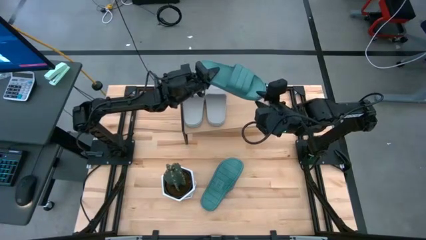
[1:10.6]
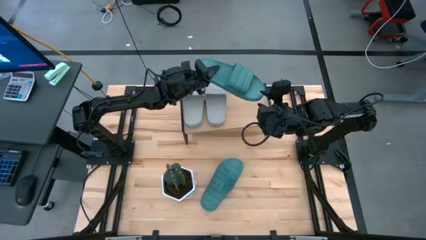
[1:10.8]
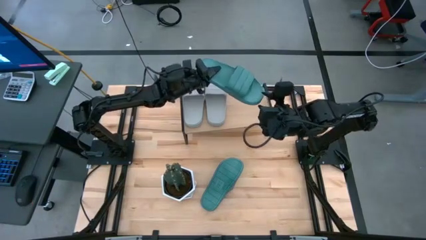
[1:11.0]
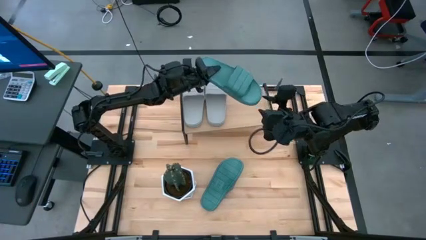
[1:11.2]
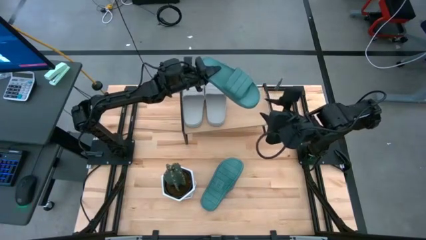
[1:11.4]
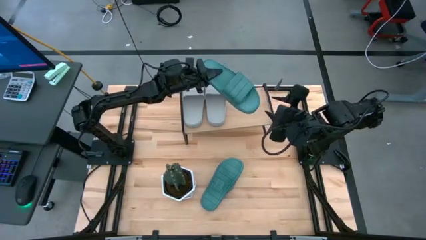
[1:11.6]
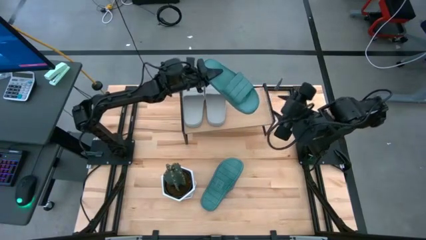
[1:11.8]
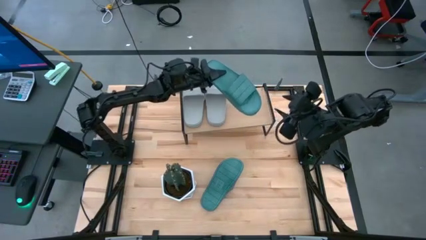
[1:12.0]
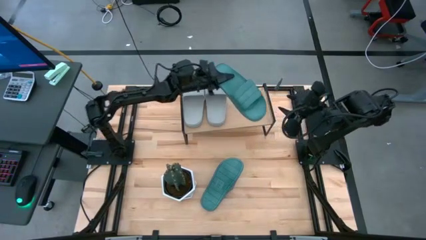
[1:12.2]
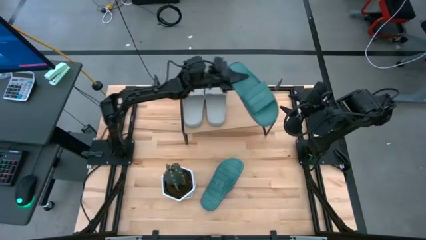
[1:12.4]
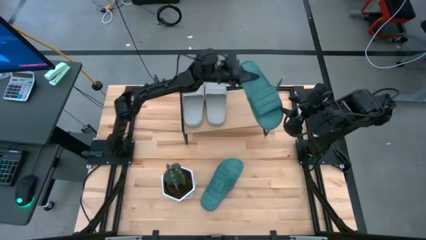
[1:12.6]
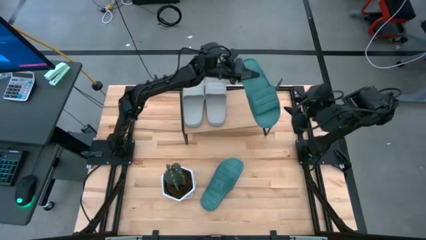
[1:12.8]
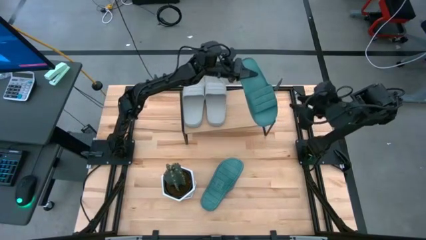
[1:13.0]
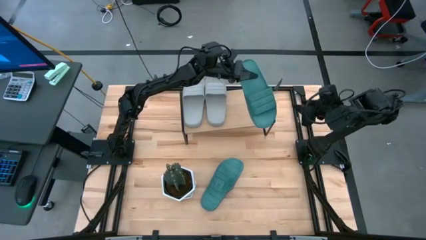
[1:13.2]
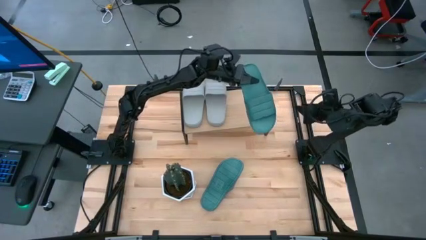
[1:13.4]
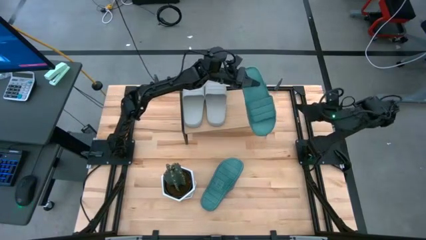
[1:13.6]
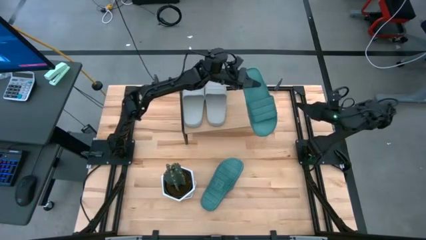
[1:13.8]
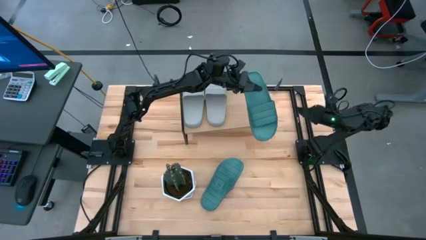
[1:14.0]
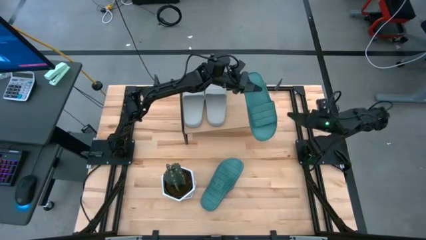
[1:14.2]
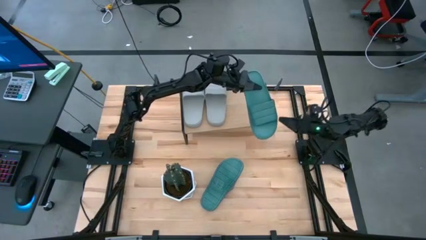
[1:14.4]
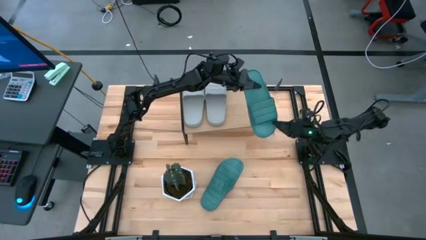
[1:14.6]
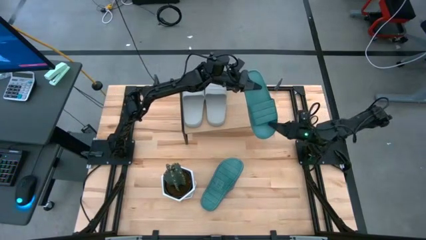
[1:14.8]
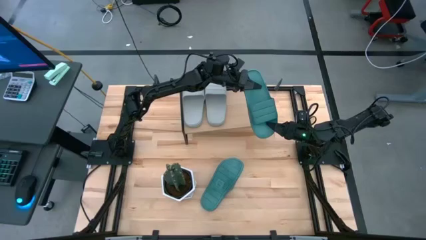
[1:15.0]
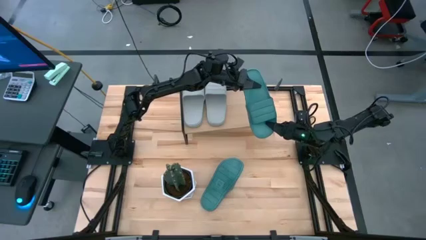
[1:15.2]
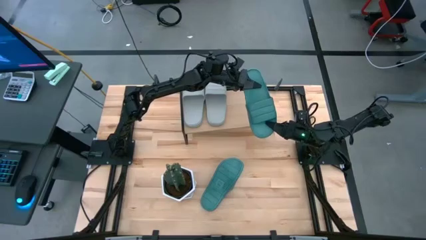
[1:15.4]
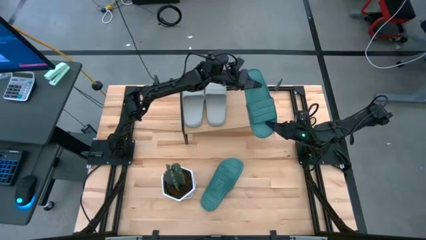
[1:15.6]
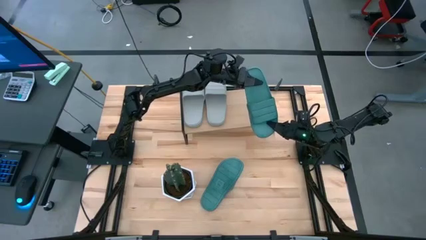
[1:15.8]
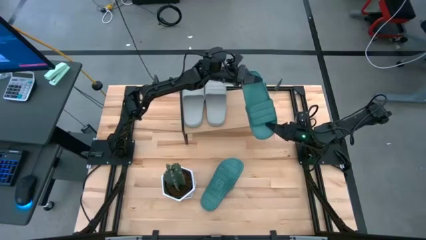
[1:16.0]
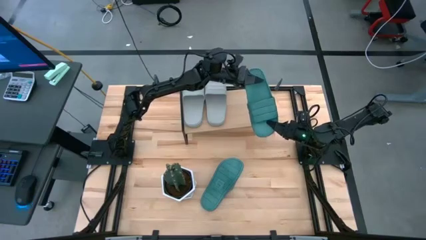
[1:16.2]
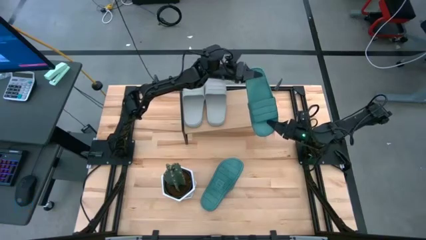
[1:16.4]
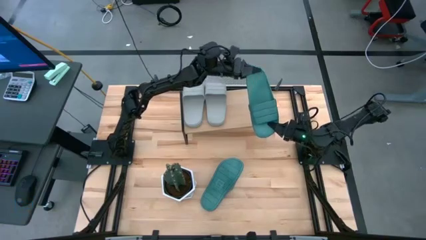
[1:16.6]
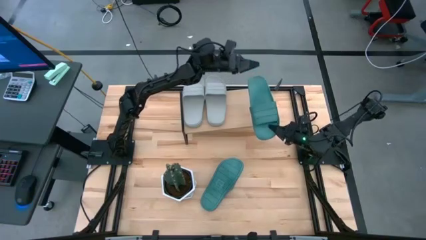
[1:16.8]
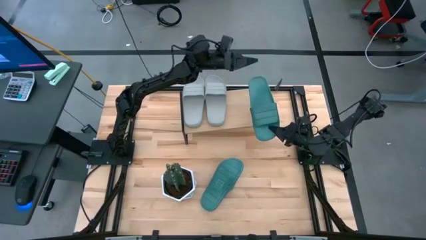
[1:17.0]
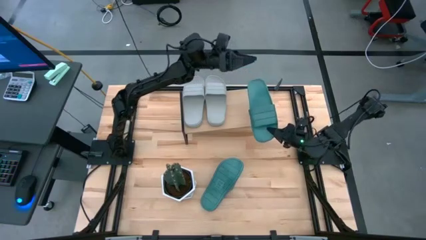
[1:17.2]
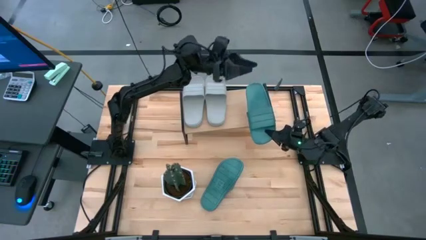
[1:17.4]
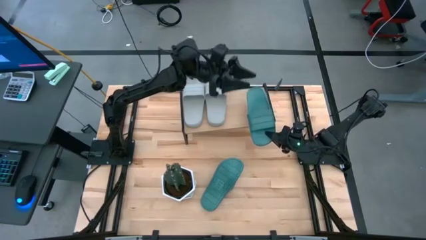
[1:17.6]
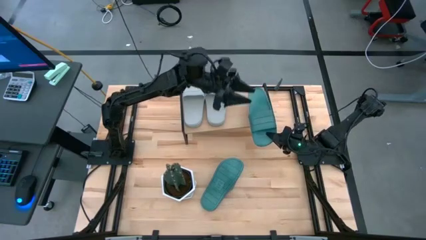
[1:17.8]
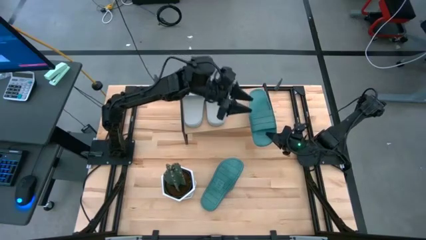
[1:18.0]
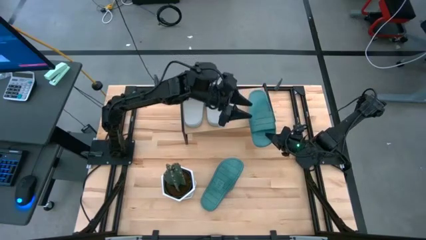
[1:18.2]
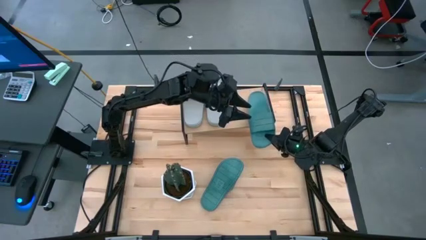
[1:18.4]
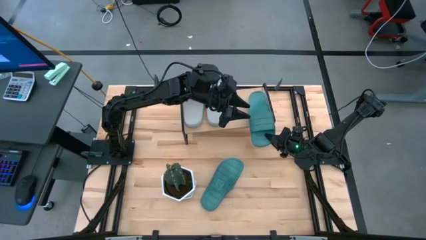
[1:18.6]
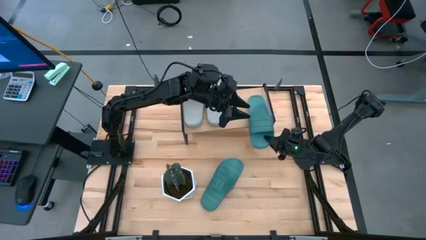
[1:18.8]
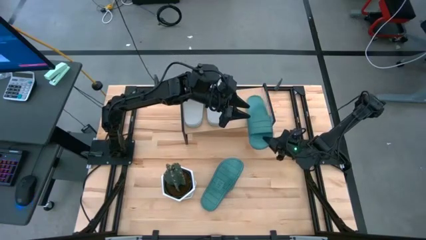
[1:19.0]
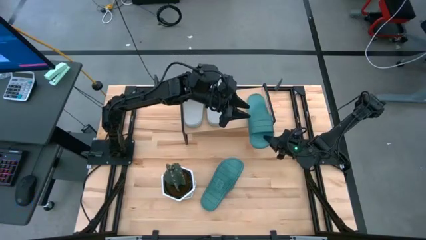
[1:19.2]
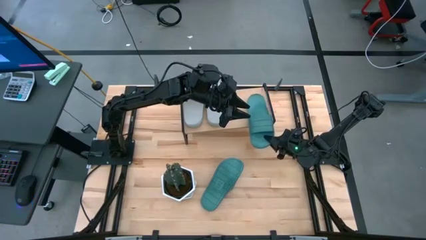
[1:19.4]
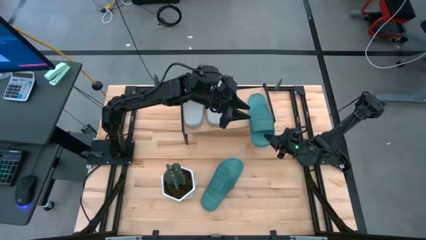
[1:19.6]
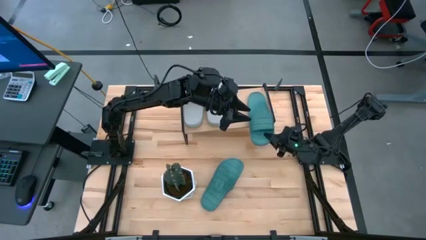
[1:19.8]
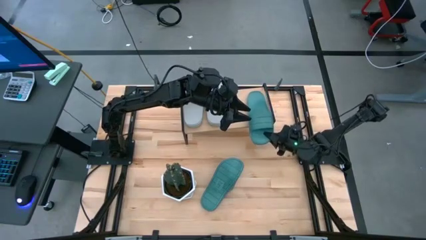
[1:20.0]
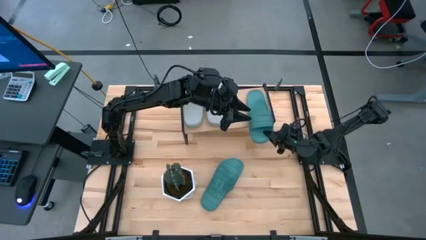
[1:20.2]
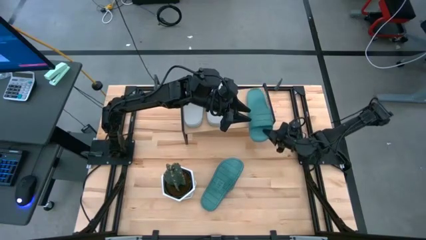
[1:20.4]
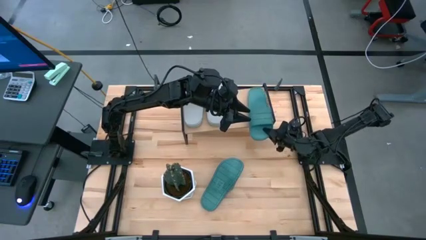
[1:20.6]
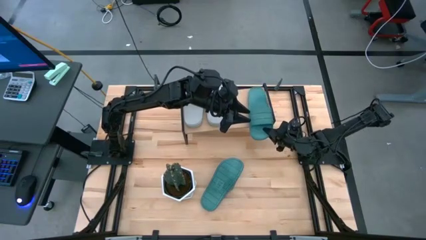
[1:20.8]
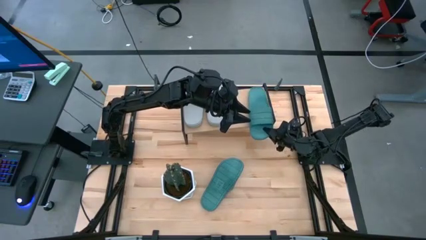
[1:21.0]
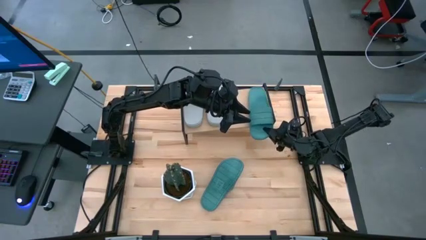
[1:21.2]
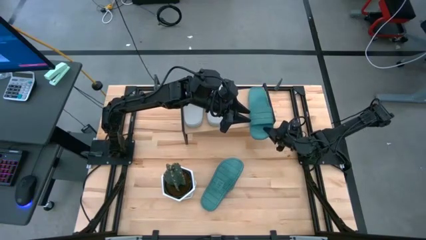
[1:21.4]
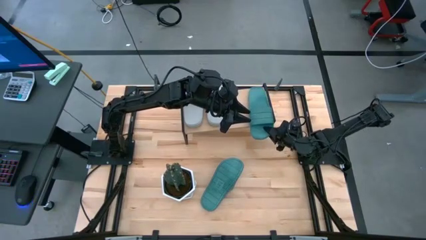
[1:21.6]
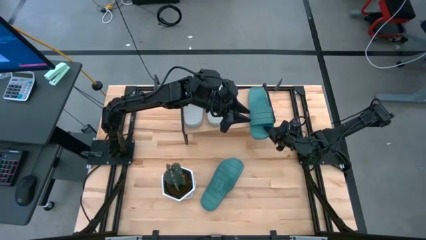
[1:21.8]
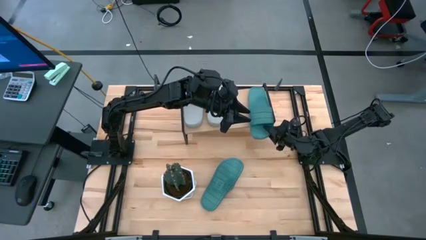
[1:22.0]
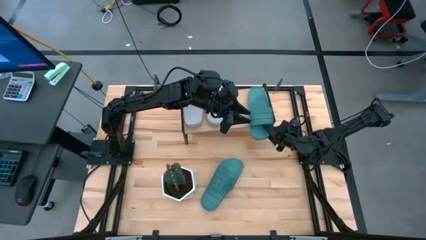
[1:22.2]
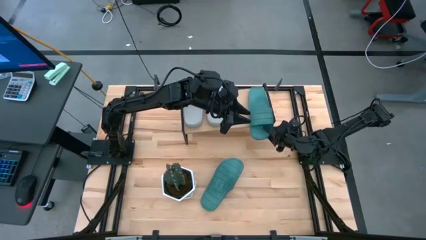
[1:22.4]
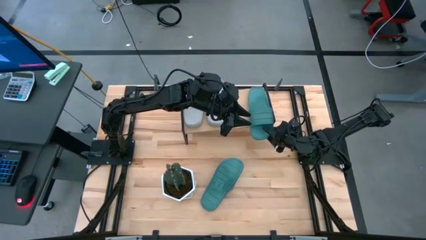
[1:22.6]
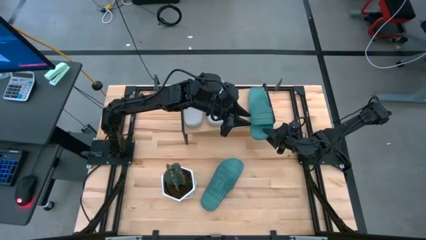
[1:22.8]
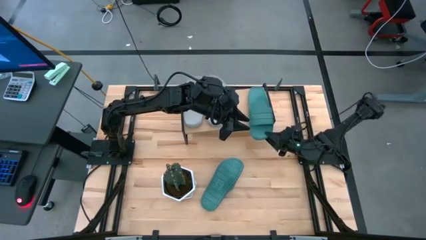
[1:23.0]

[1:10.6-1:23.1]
Task: Pick and place slides into the shelf
Put the right green slides on the shelf
